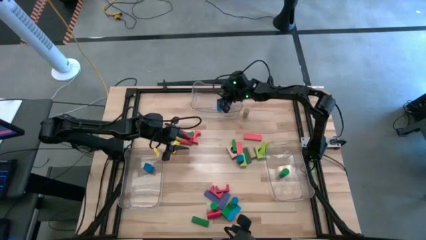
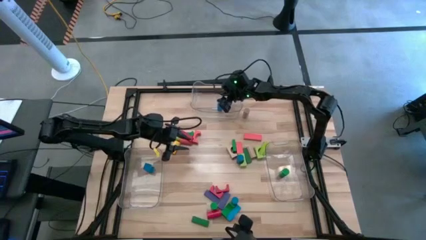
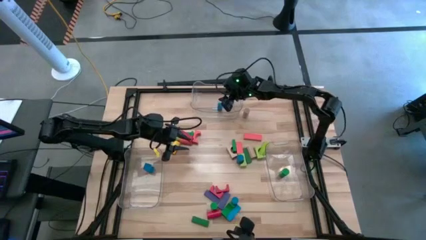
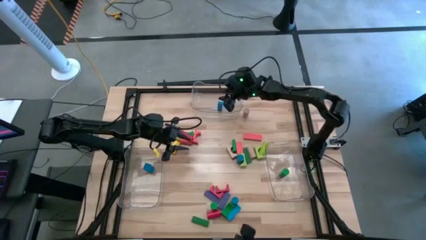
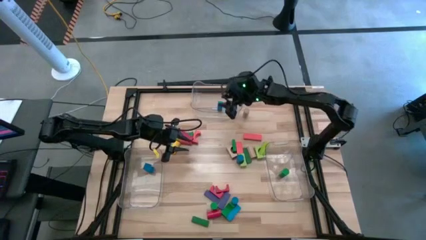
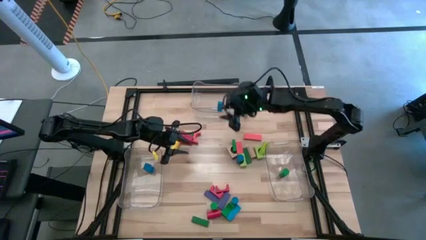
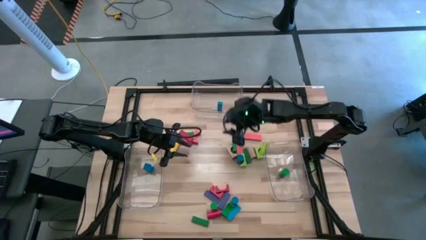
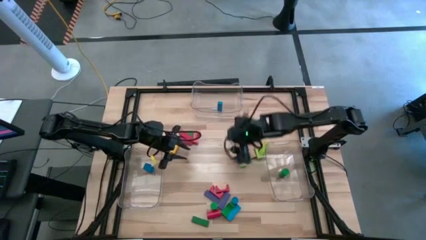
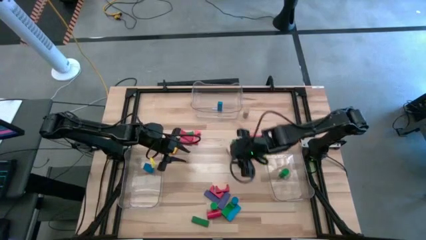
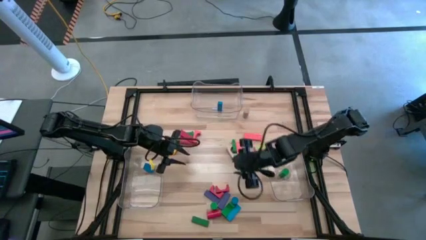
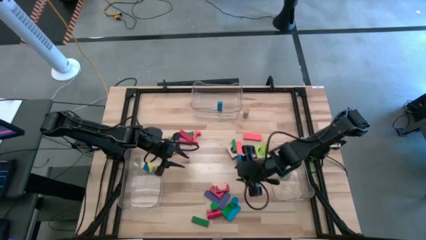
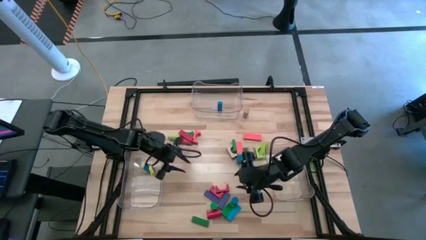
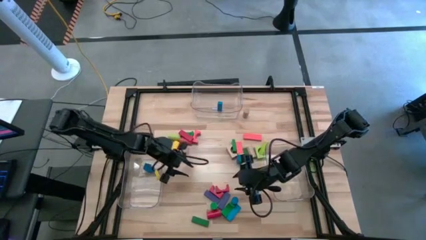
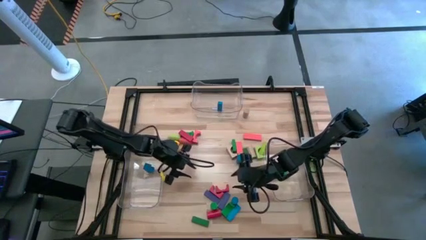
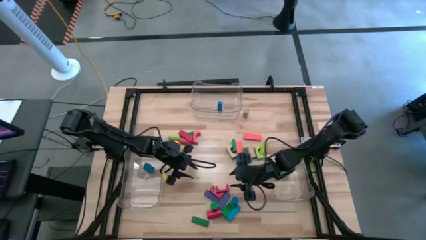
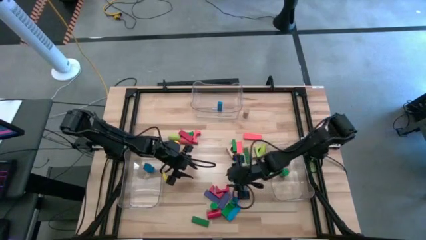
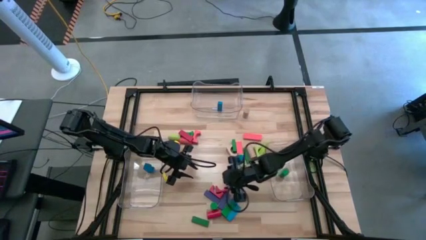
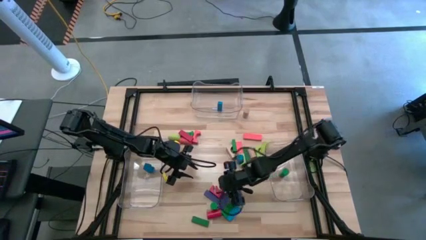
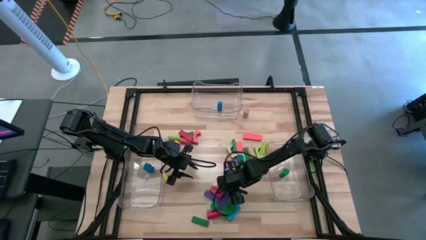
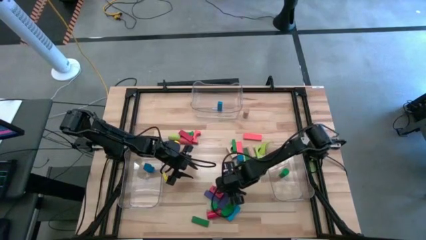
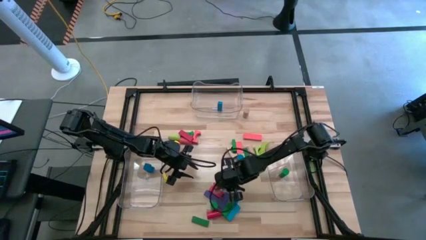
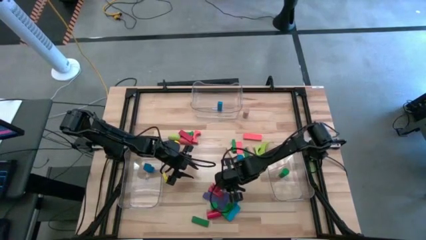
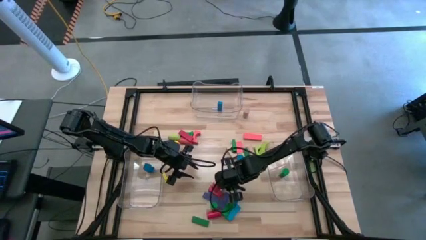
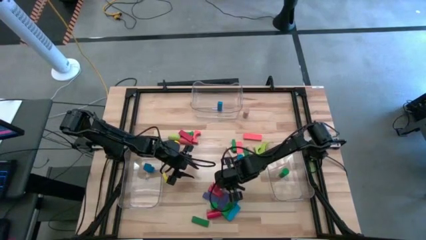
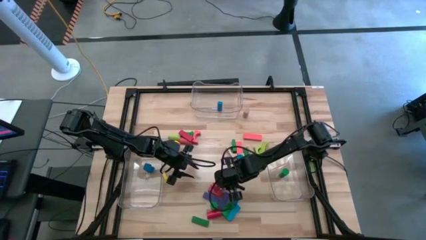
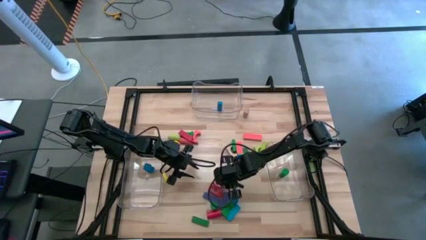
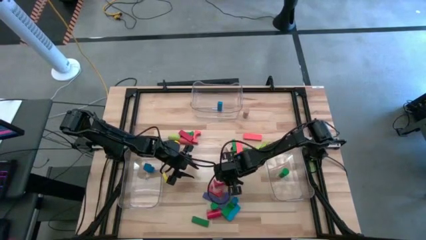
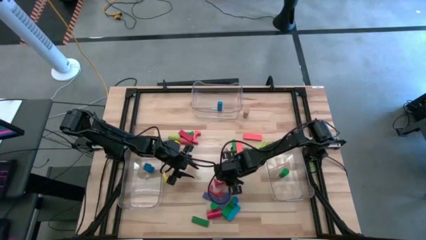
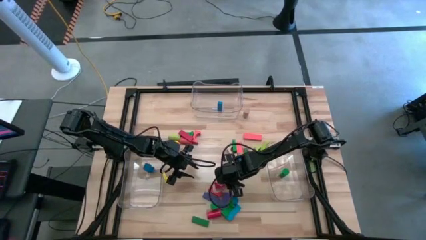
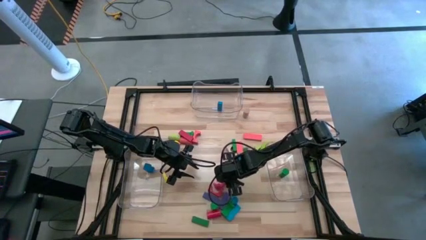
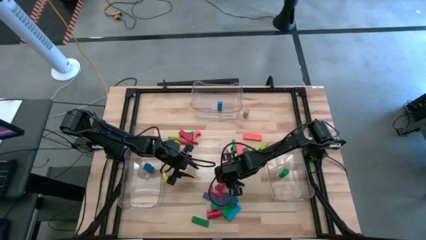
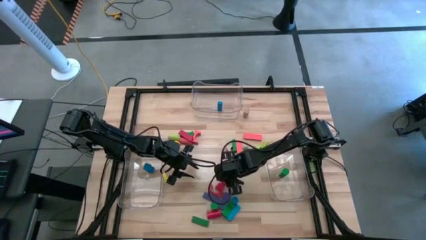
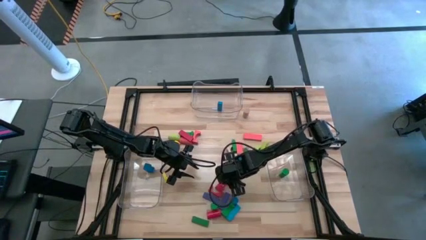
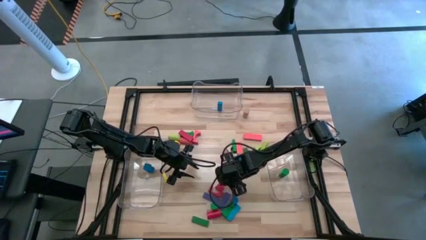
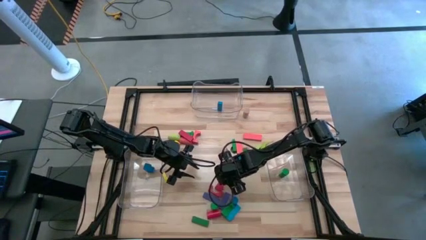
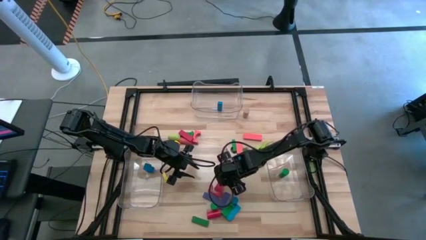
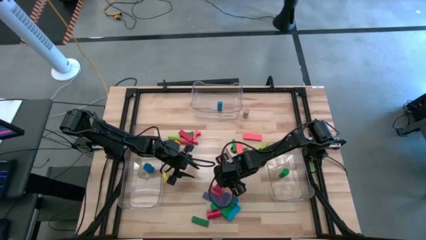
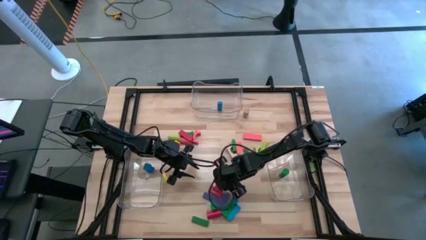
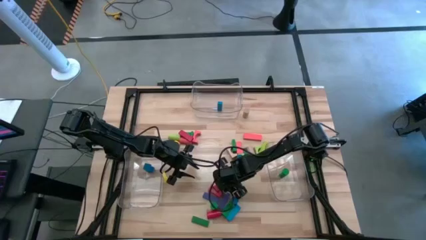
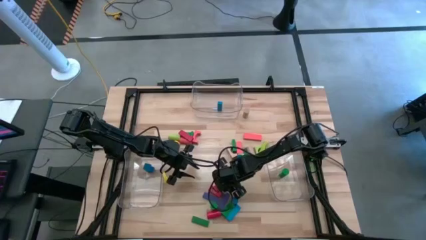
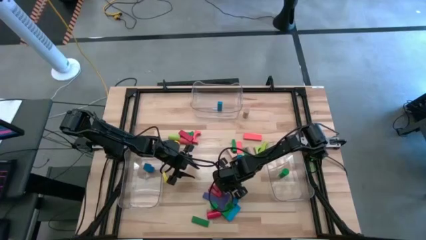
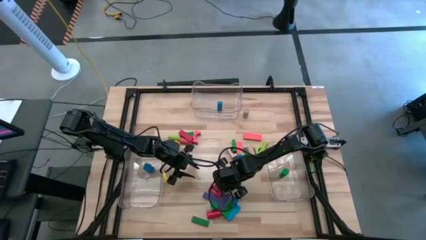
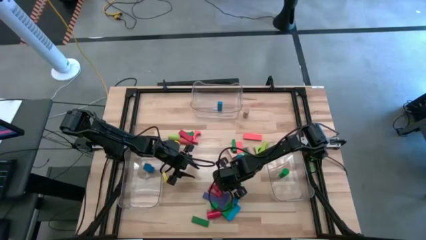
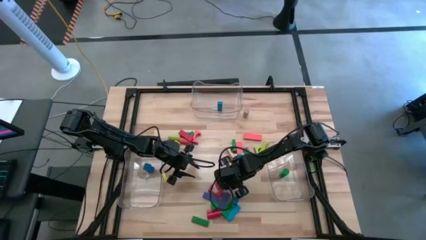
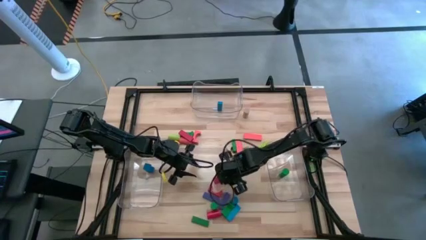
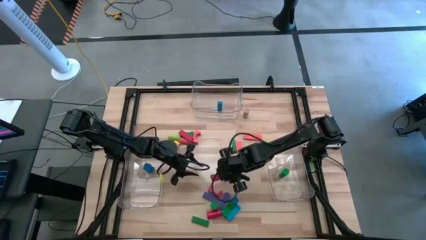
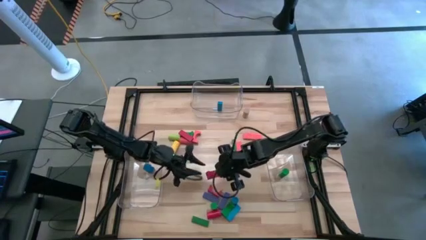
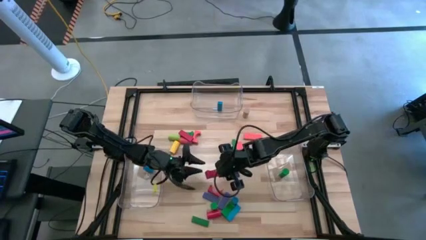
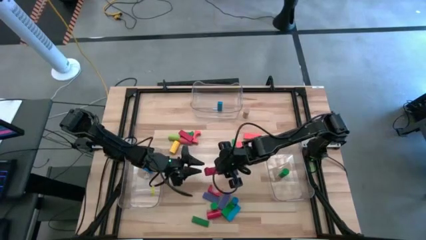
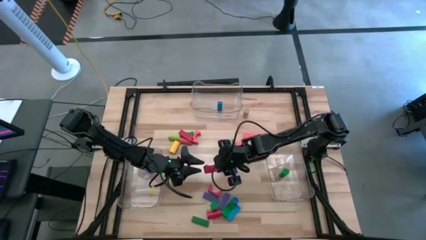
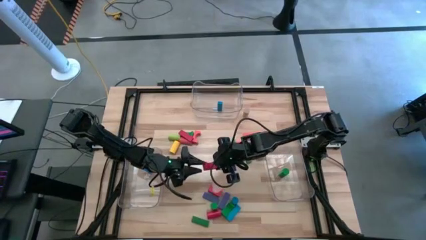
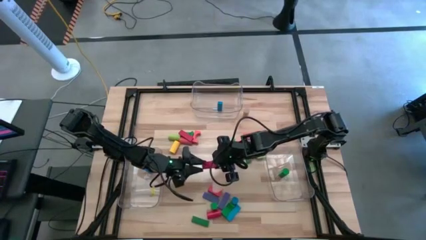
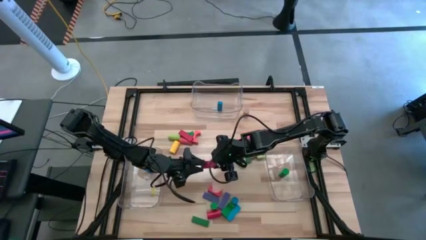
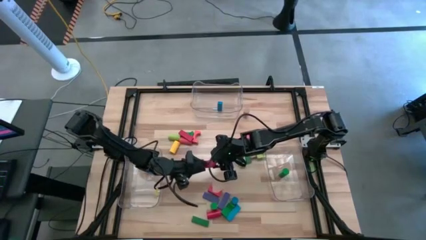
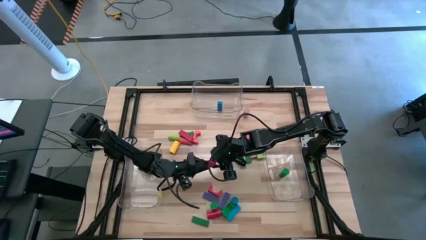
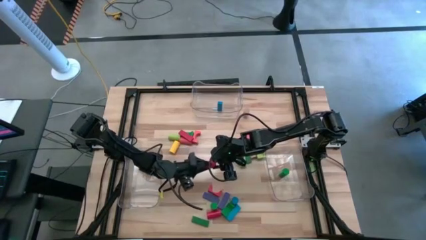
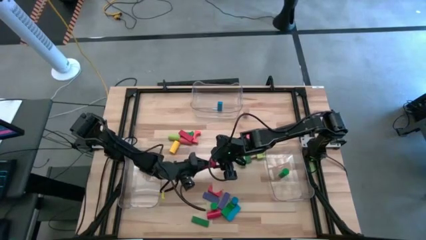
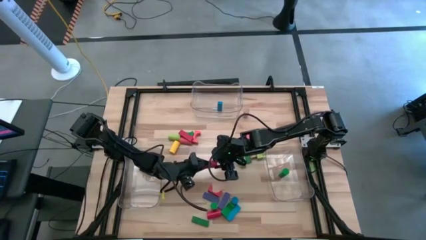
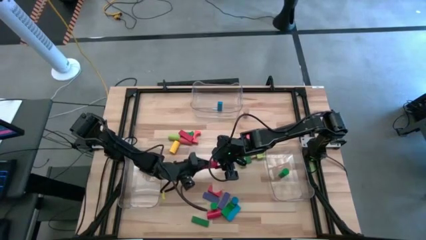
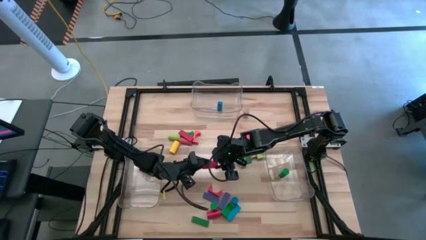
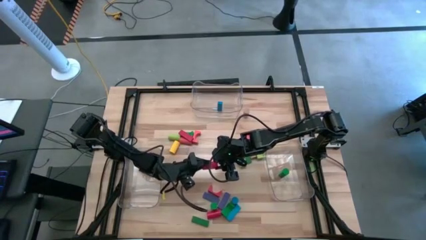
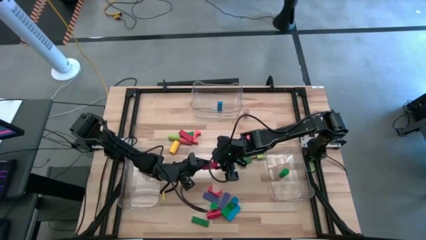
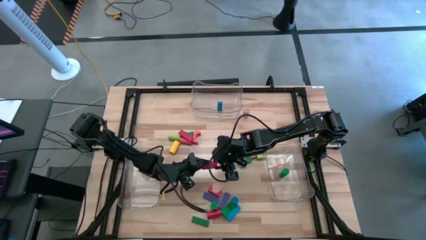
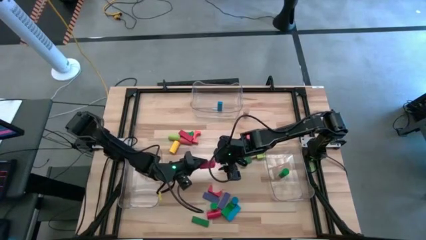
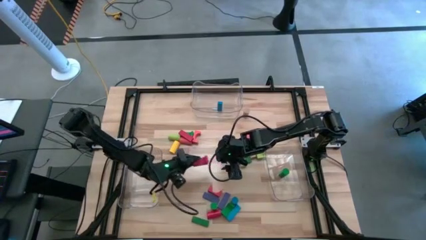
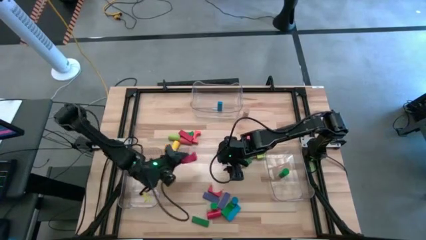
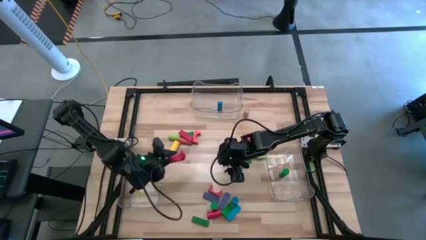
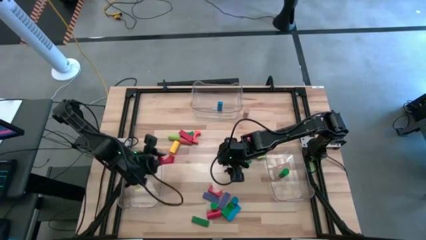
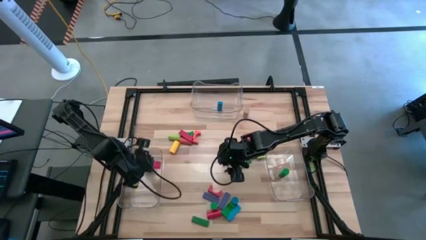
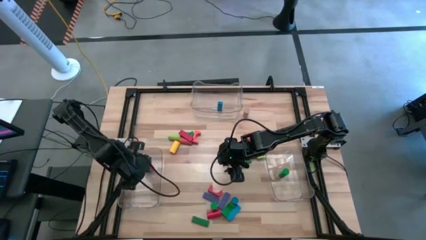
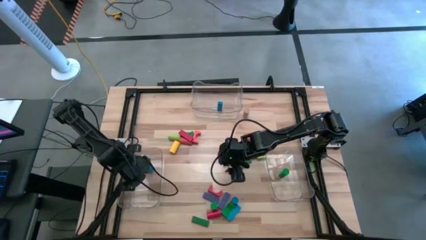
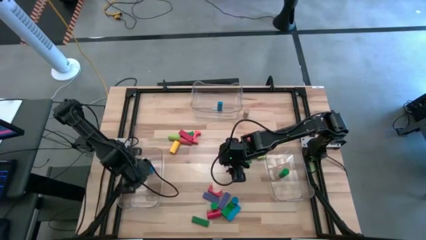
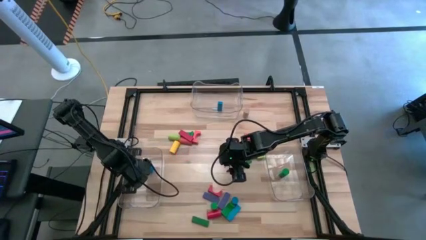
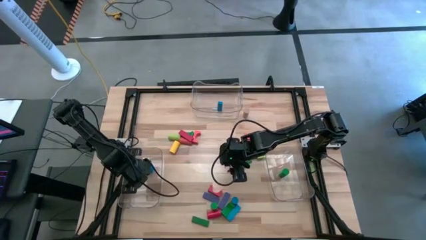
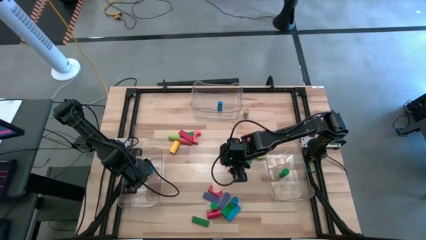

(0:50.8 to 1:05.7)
Task: Sort blocks by size
Put the red arc block into the left transparent bin
